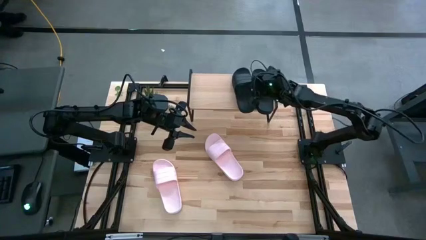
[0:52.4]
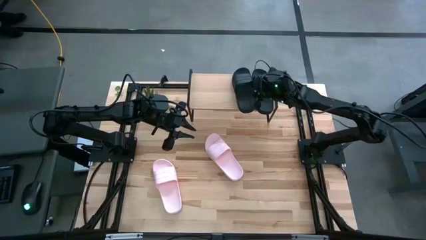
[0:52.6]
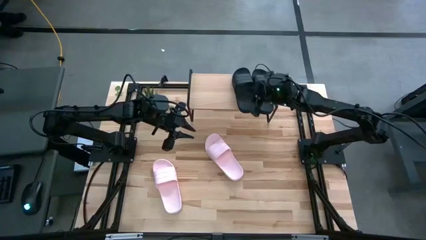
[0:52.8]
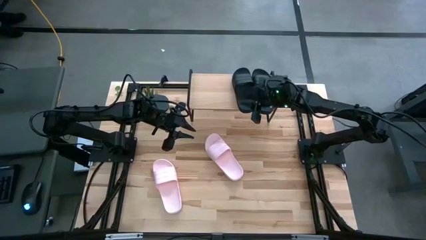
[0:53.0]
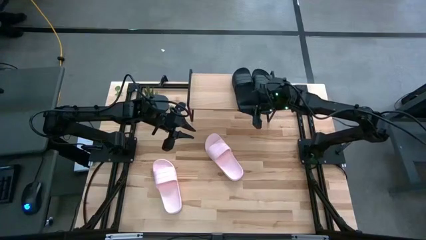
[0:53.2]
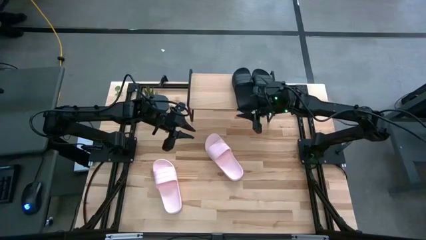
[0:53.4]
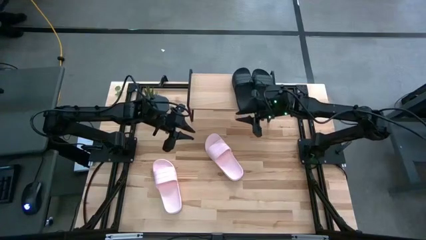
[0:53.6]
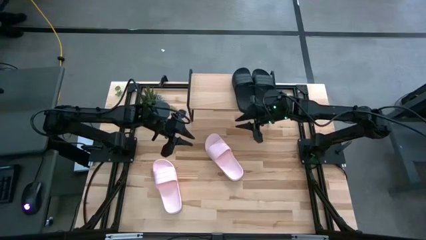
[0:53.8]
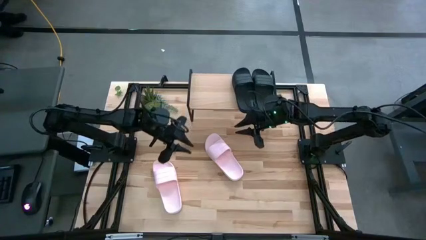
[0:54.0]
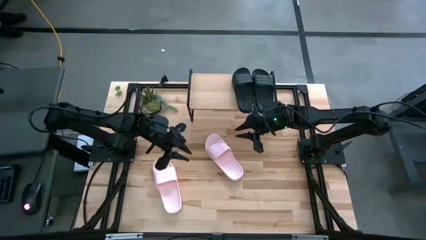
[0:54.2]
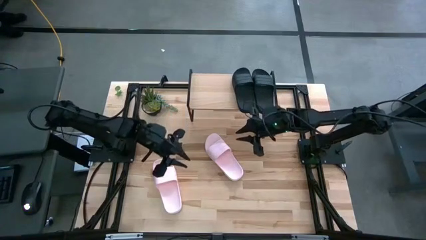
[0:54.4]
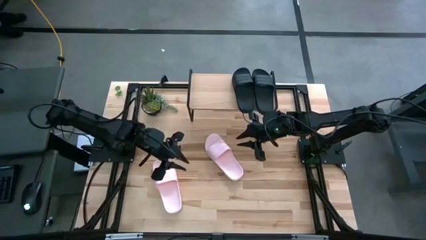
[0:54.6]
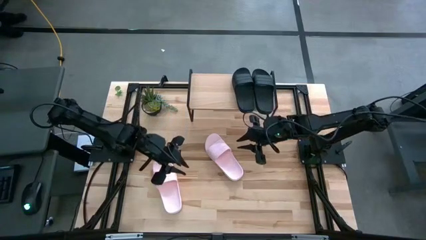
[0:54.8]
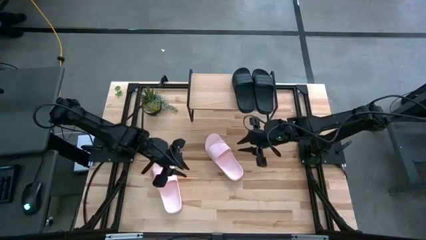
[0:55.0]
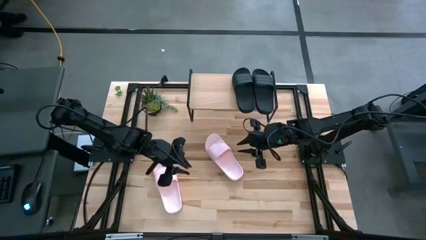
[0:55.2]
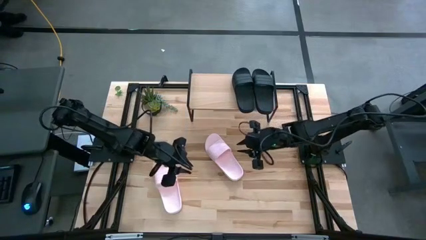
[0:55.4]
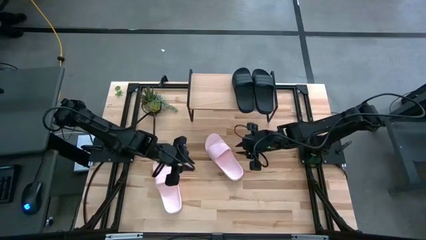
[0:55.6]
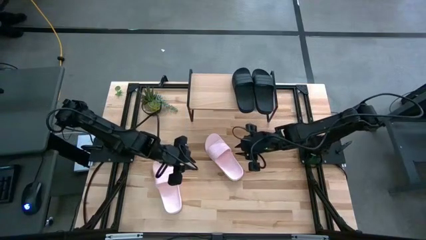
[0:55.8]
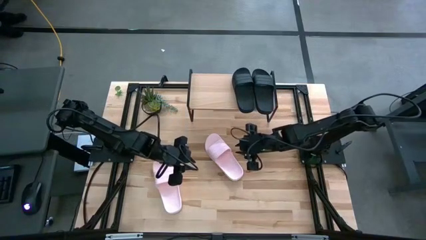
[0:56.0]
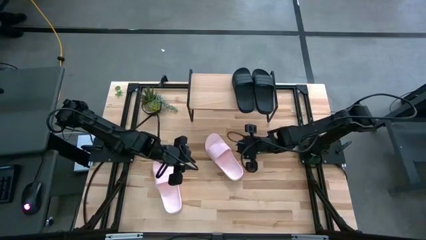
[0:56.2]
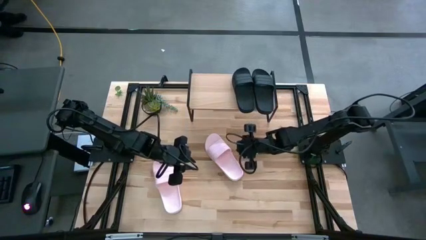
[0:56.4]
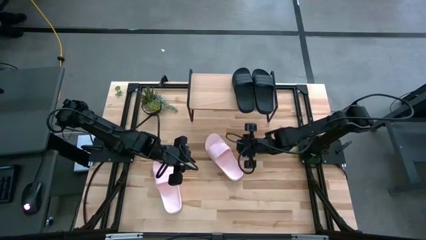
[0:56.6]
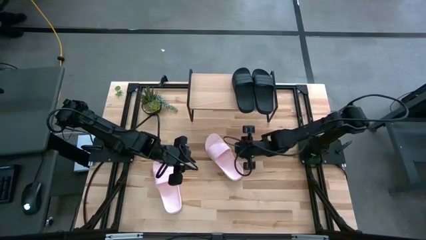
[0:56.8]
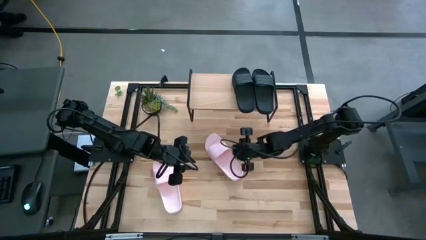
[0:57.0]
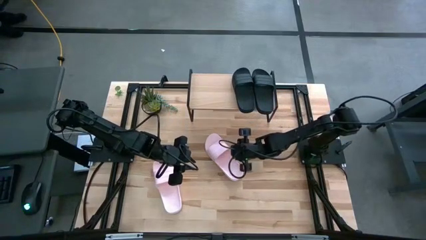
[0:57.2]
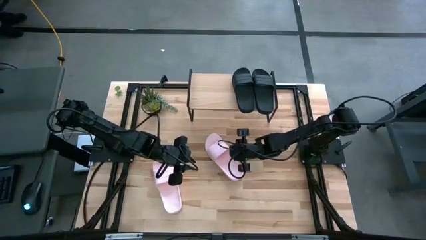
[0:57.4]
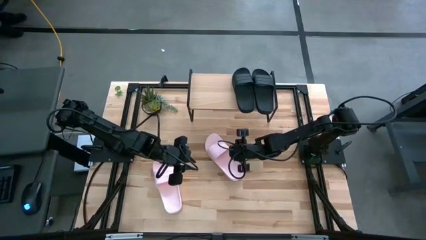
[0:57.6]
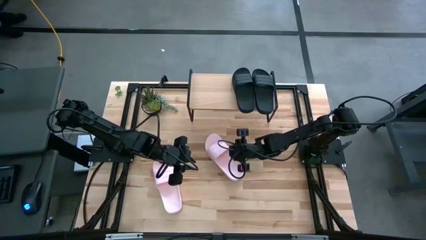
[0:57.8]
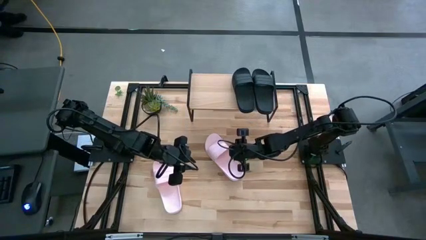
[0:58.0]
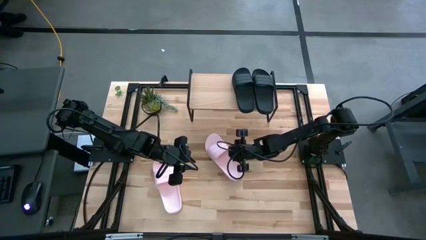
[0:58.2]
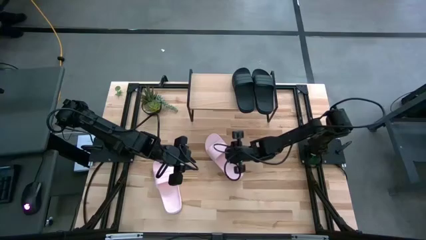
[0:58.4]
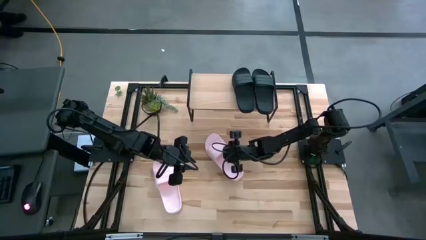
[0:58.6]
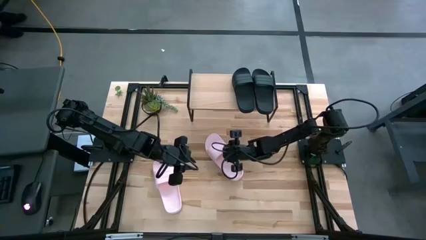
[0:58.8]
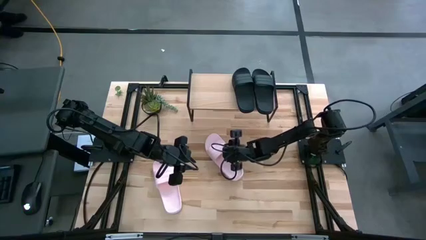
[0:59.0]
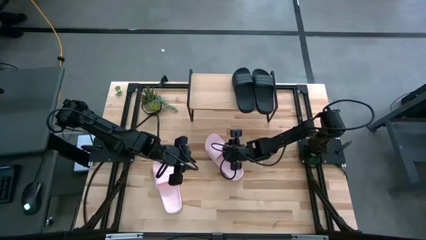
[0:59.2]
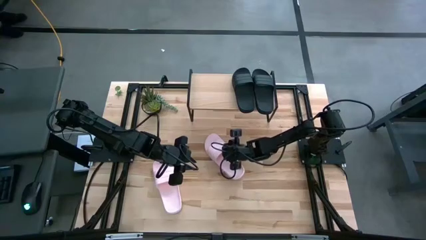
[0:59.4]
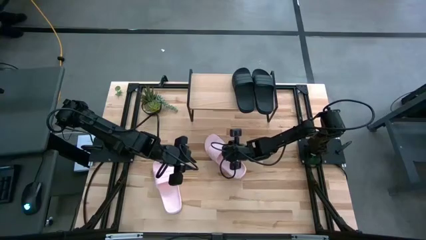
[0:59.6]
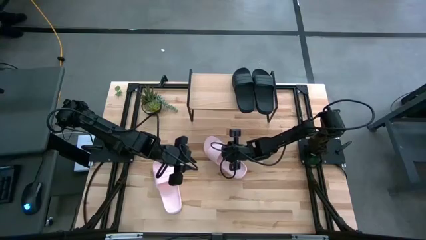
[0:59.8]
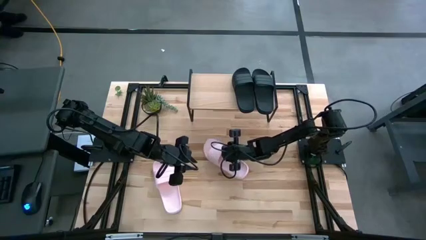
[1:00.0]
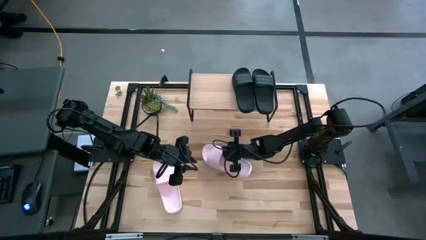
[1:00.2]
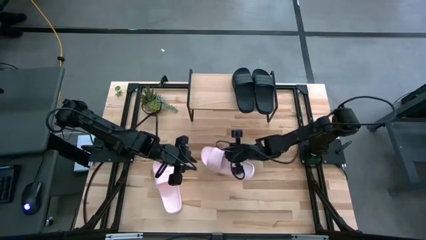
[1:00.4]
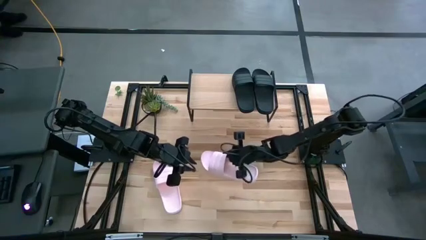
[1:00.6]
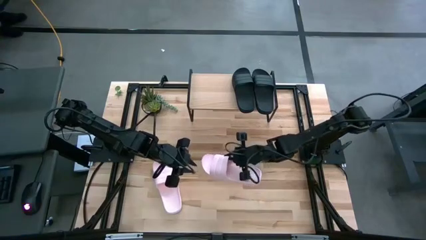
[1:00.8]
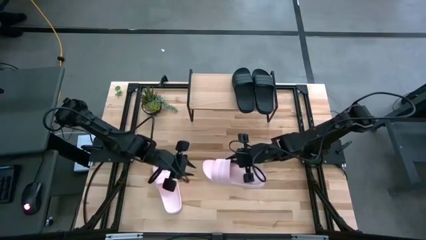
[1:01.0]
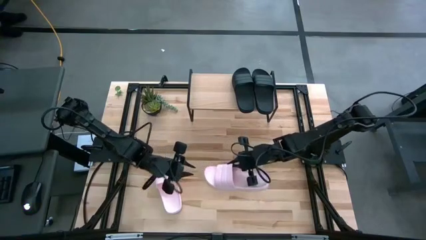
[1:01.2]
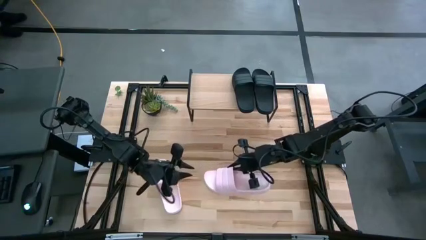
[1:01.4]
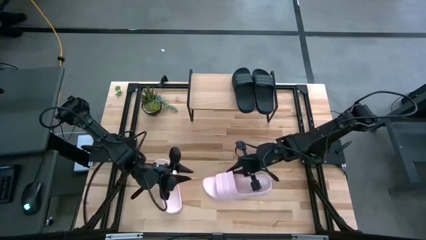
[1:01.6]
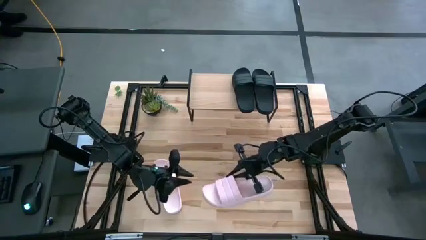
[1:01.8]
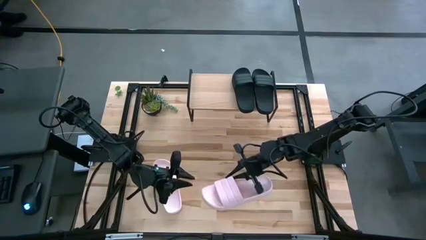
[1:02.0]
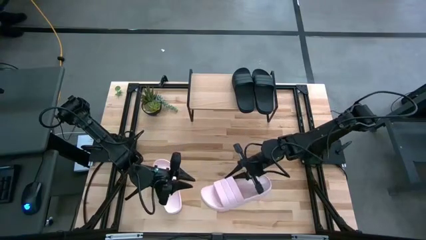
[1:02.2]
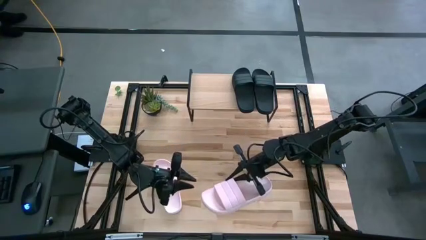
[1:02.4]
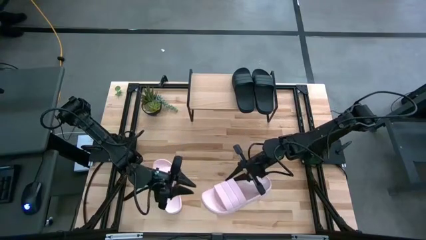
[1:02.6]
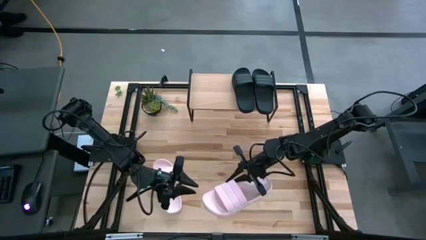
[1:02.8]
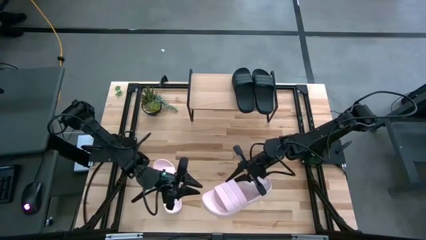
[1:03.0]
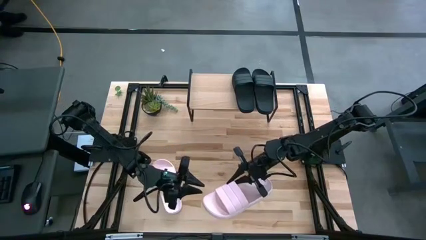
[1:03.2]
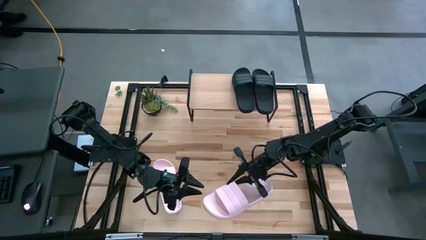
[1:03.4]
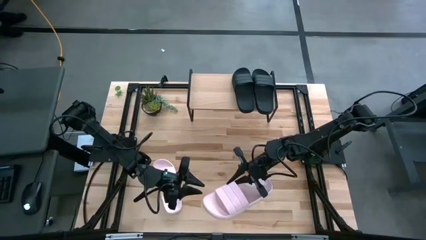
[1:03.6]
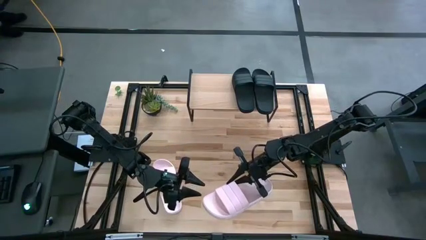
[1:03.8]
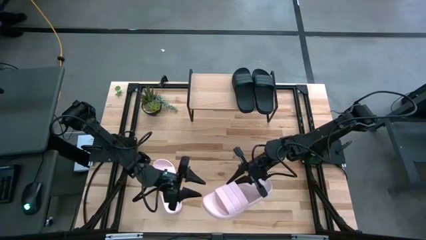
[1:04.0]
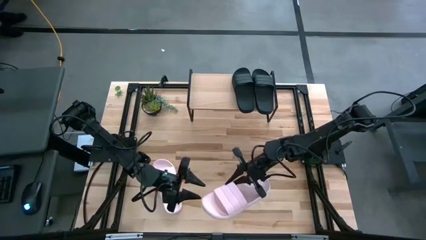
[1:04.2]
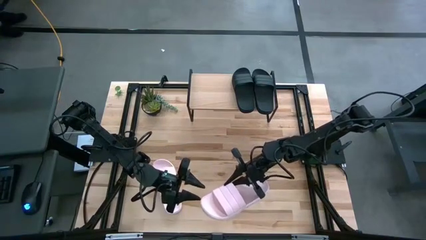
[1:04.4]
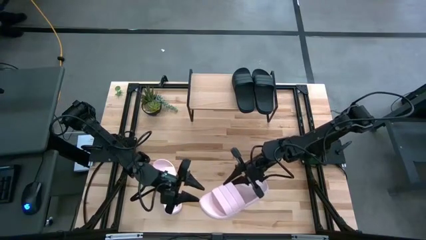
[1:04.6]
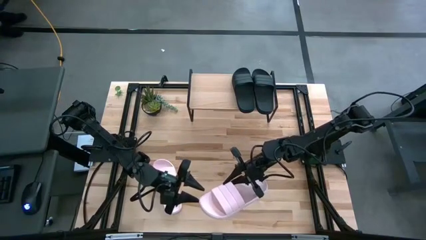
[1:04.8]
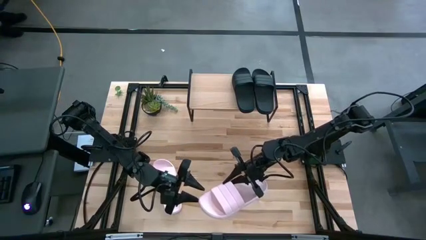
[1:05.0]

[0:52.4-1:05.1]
Task: Pick and place slides into the shelf
Put the right pink slipper on the shelf

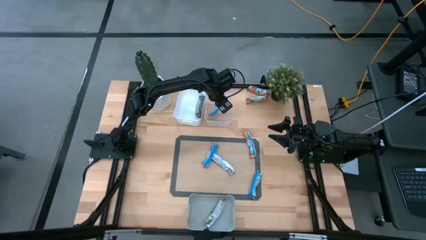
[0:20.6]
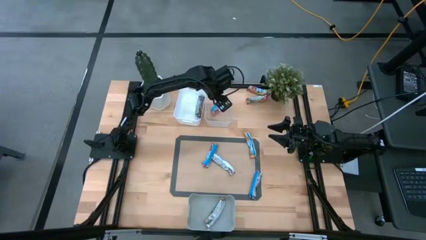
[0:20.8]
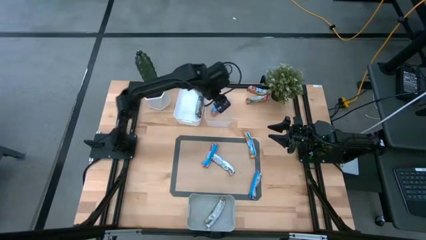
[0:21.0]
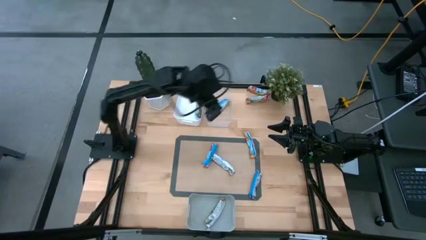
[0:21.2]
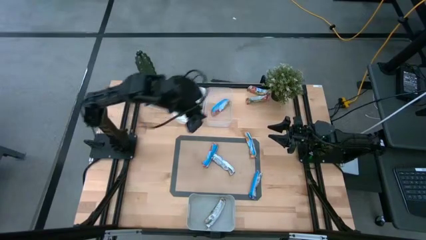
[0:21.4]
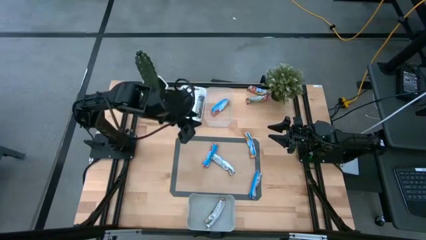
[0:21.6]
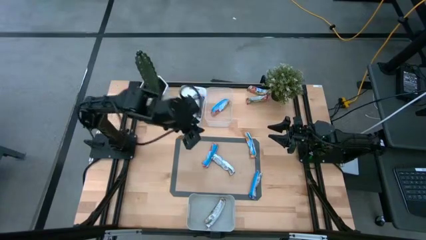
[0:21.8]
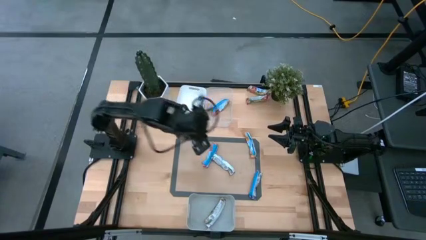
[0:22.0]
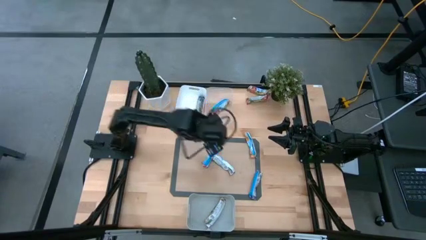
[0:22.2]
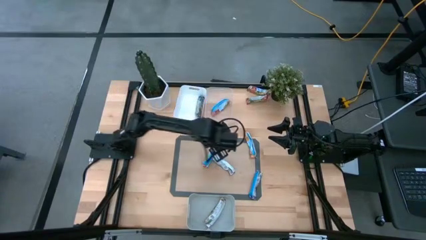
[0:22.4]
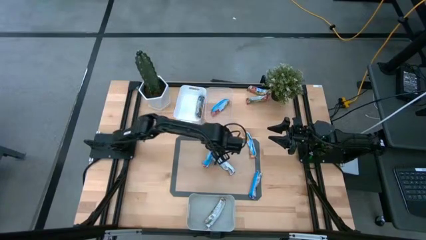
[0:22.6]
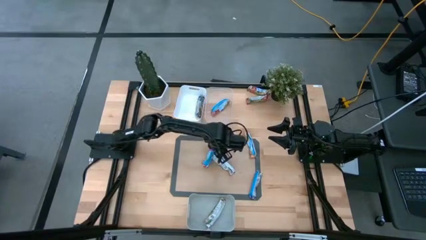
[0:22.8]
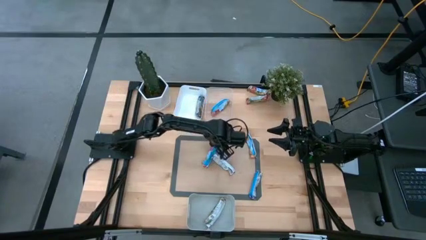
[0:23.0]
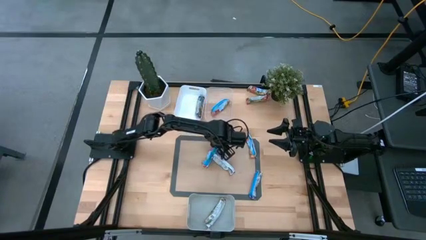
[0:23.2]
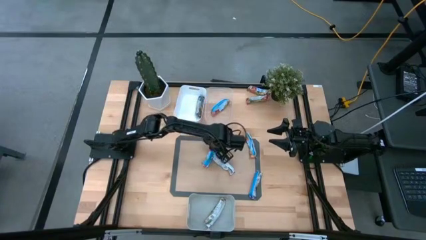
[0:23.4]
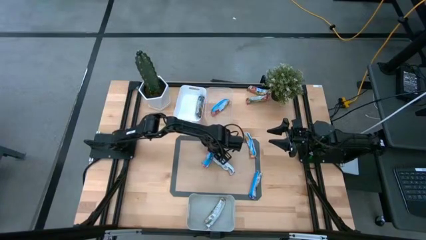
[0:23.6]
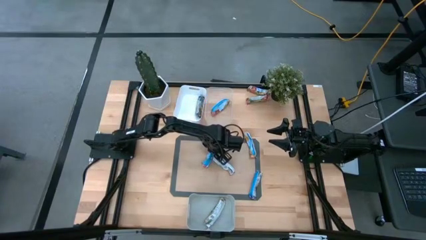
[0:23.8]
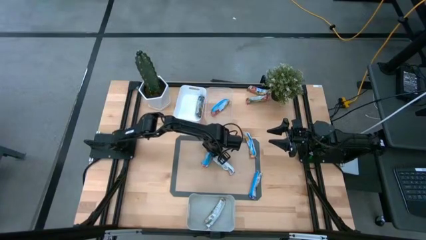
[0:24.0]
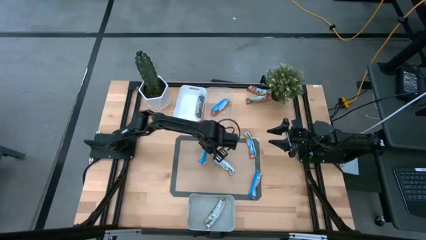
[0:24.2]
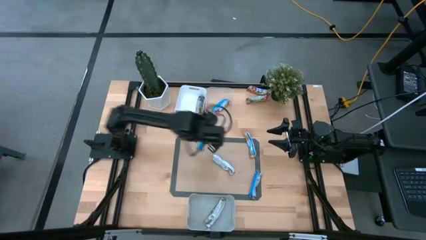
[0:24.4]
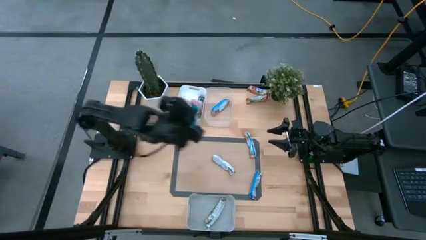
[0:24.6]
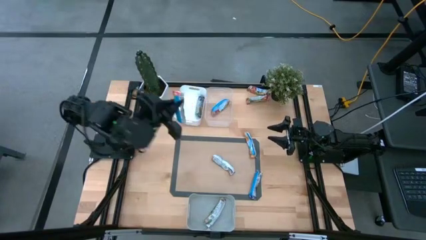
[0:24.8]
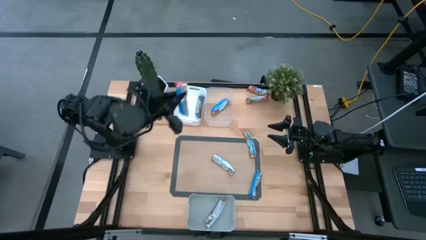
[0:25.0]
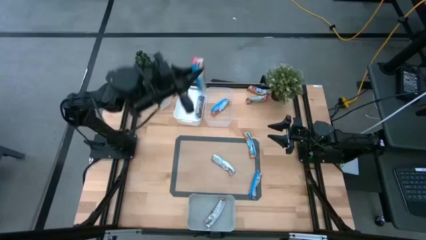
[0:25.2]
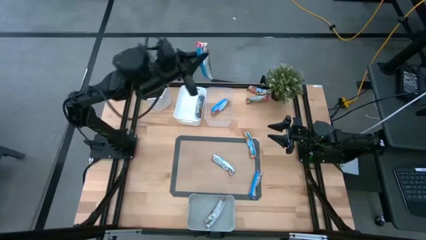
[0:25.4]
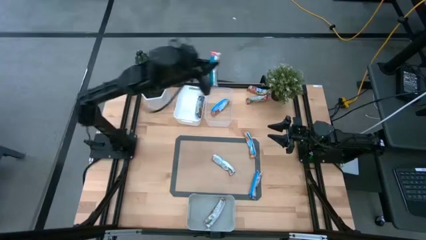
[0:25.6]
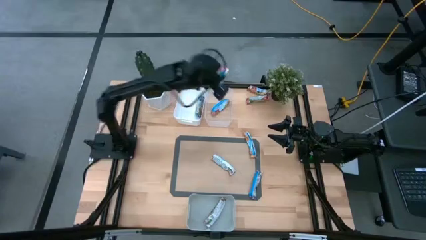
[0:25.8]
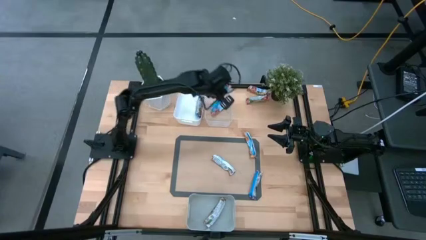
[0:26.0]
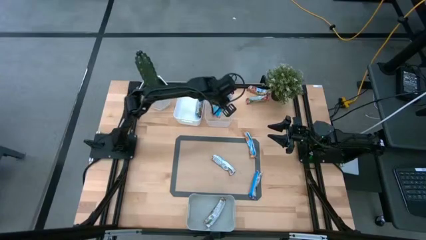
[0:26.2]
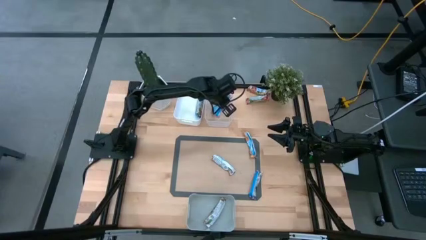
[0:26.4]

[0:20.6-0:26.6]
Task: Pick and place Granola Bars by type
Put the red granola bar into the transparent bin
